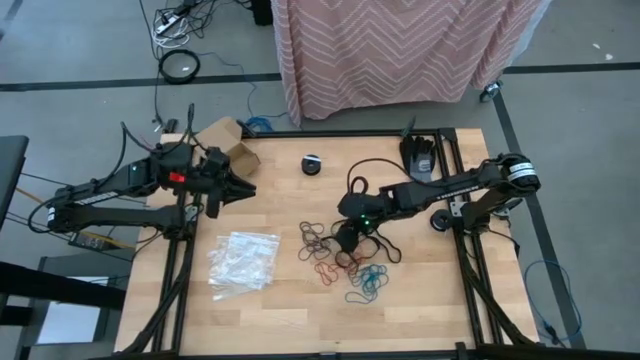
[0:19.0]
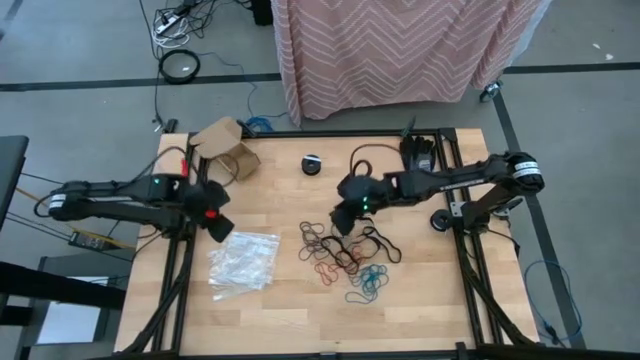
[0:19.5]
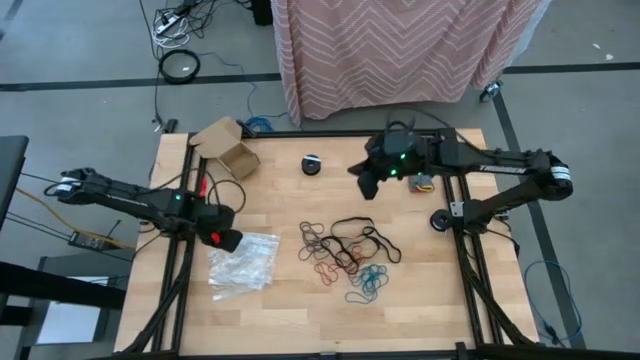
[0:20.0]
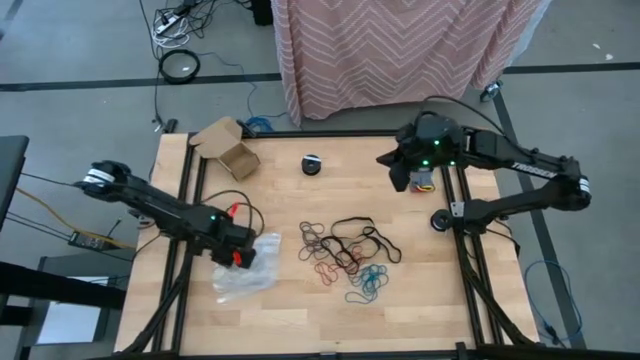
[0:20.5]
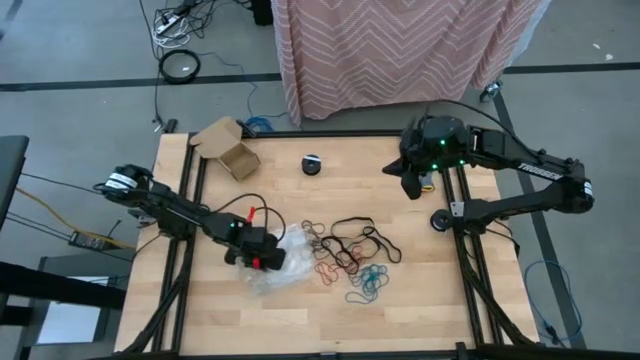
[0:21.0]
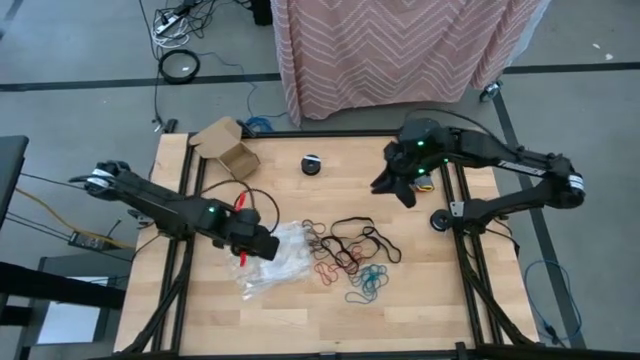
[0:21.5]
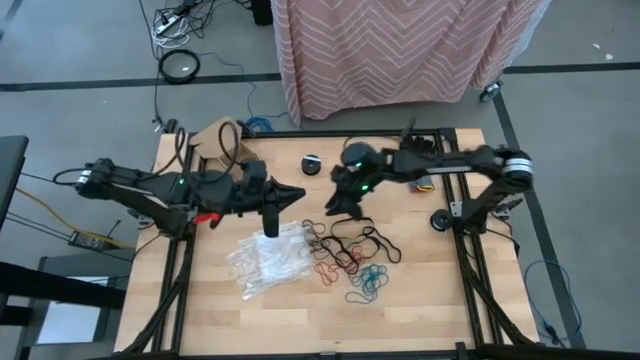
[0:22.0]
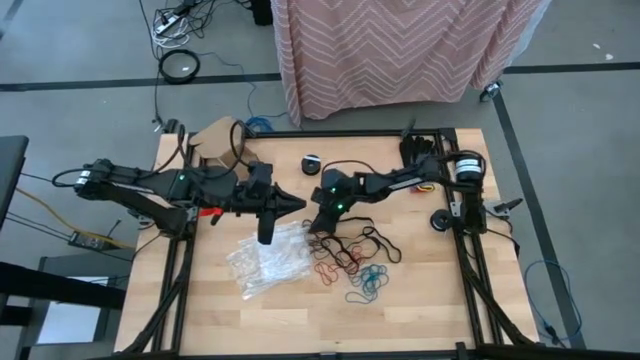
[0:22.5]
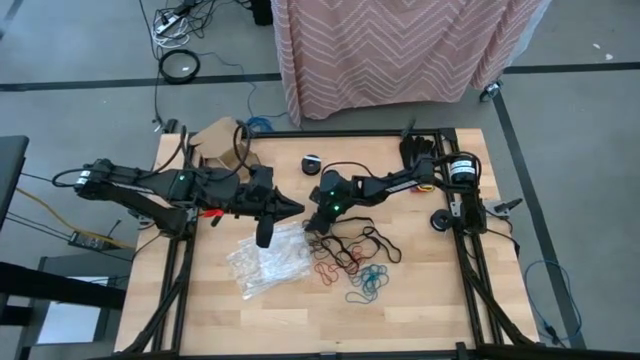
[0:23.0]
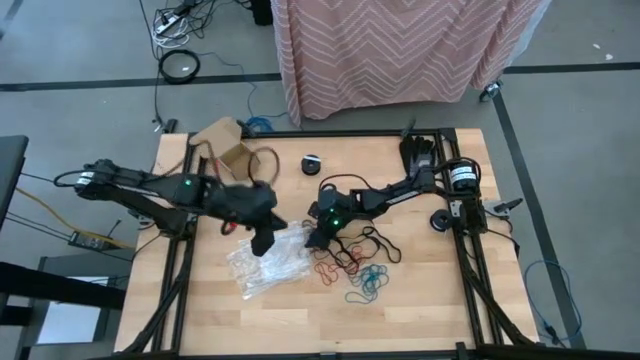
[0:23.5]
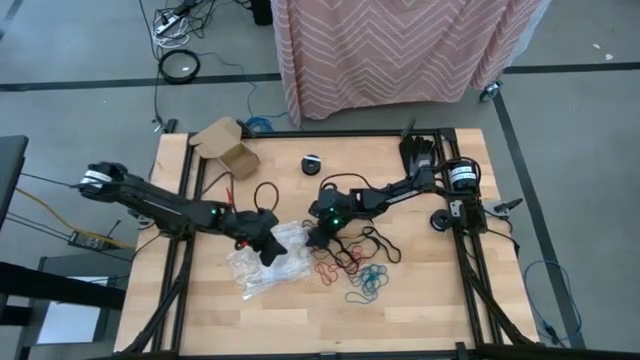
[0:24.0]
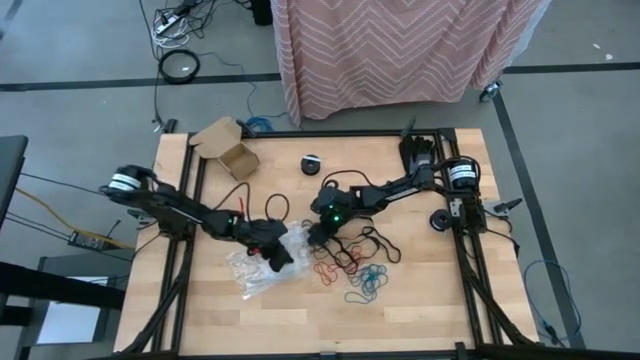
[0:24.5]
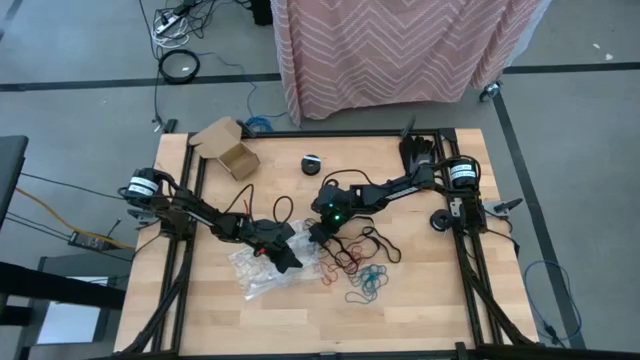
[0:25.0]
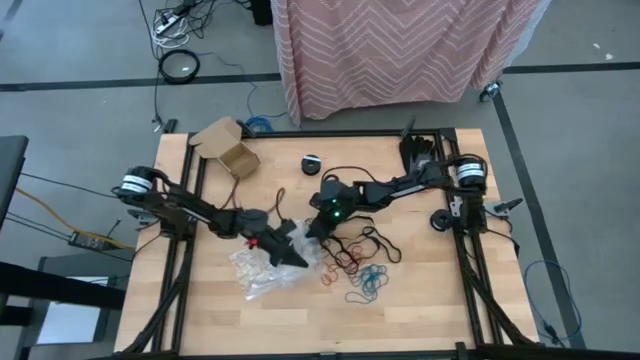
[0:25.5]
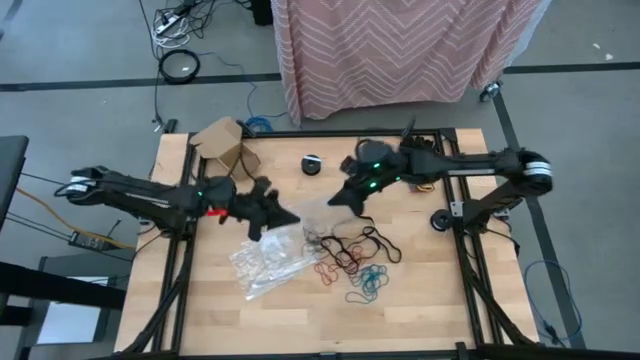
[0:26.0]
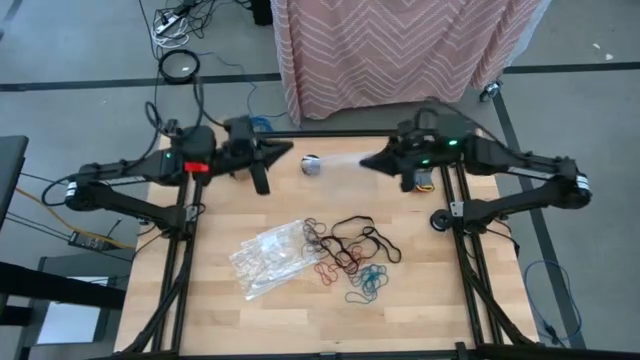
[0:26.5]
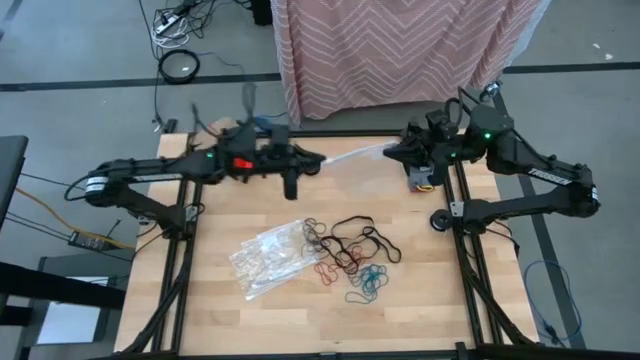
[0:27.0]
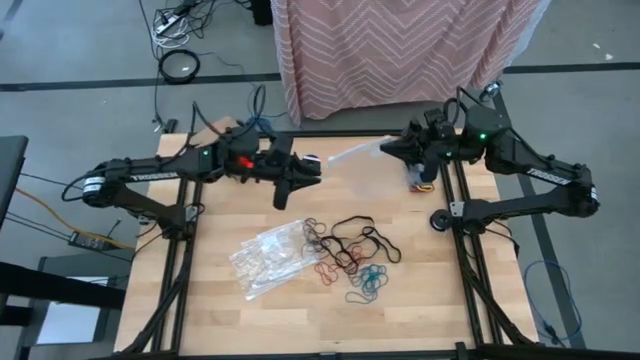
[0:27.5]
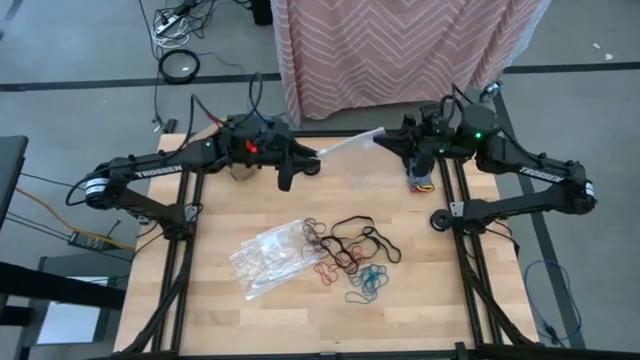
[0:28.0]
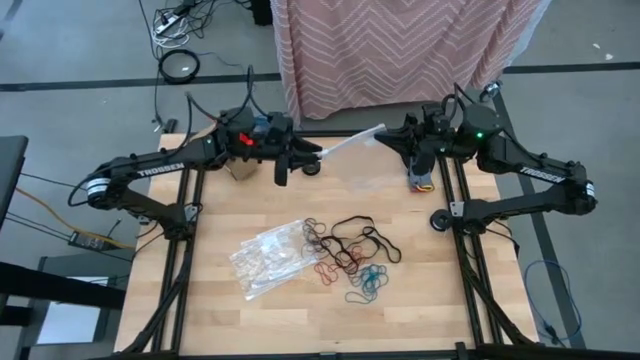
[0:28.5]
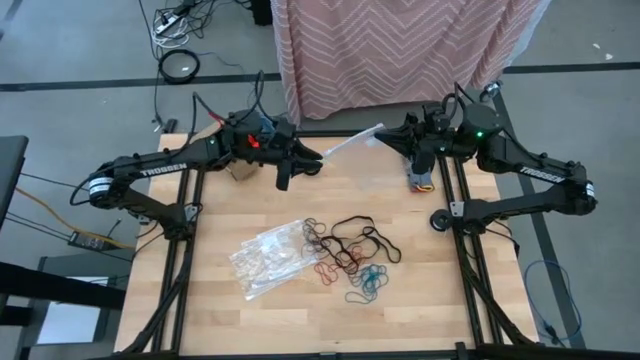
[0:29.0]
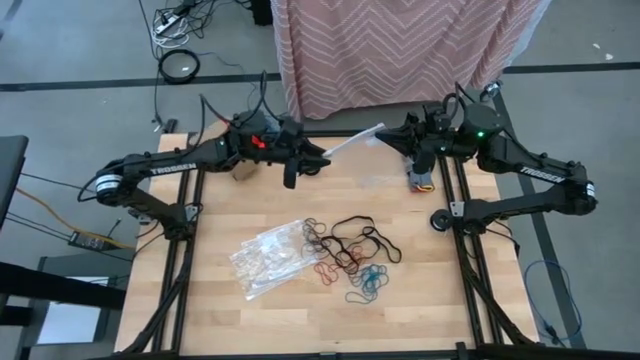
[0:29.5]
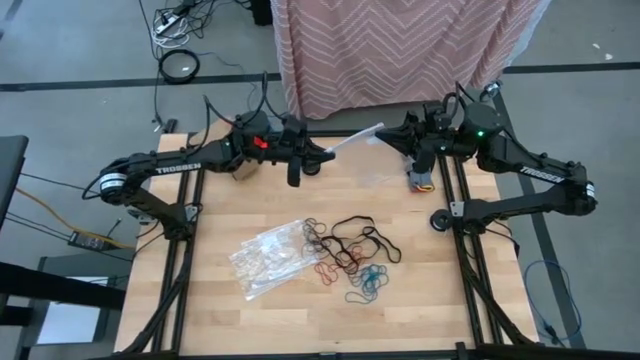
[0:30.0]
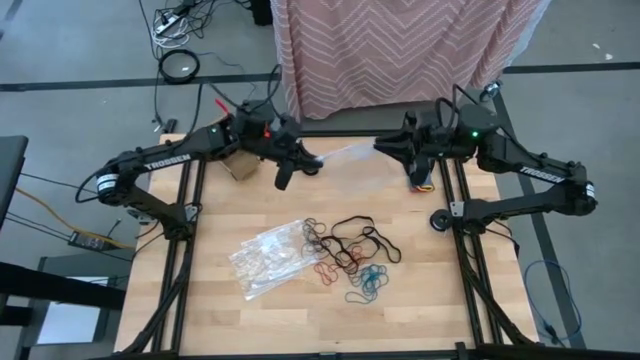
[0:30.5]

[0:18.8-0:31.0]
Task: Sort rubber bands
Open the transparent zip bag

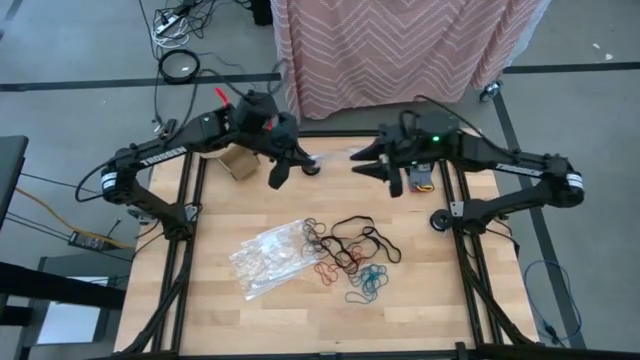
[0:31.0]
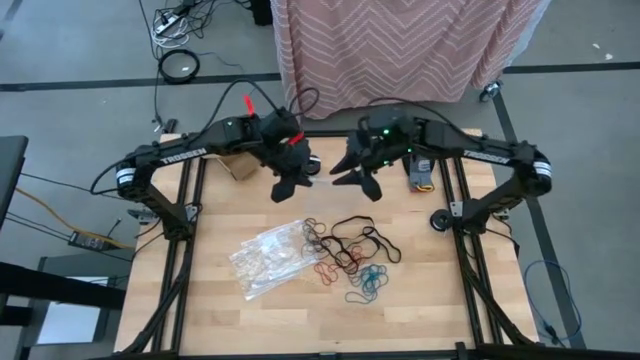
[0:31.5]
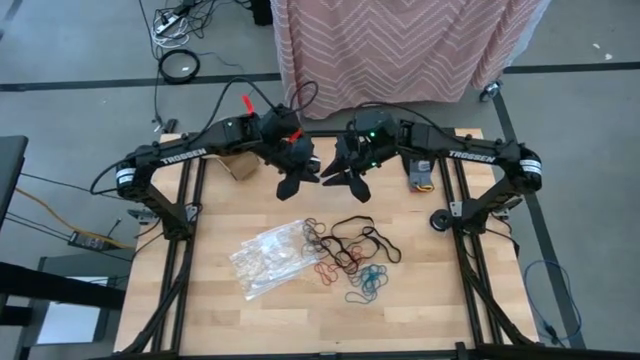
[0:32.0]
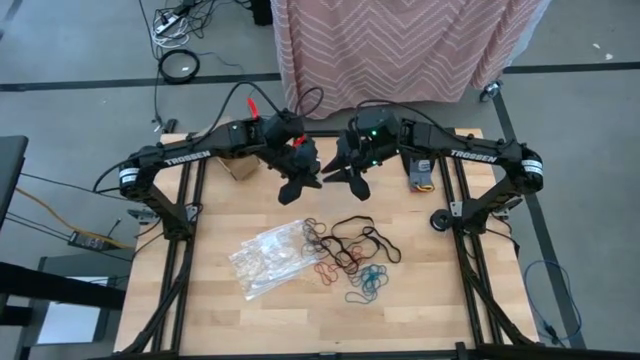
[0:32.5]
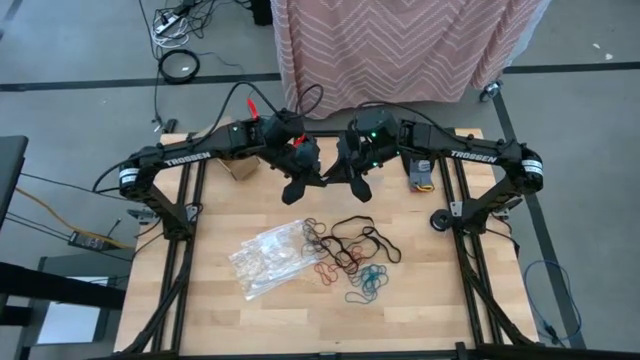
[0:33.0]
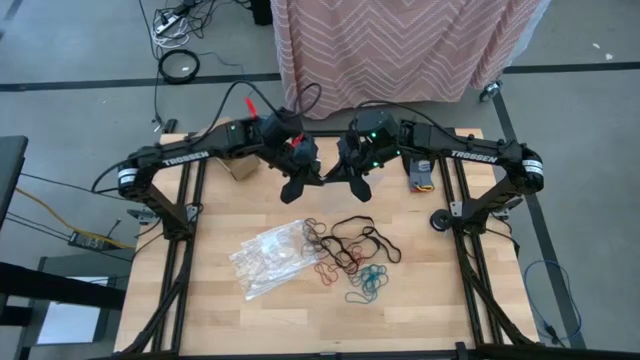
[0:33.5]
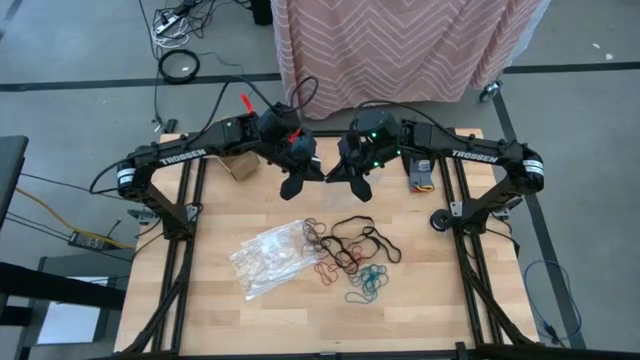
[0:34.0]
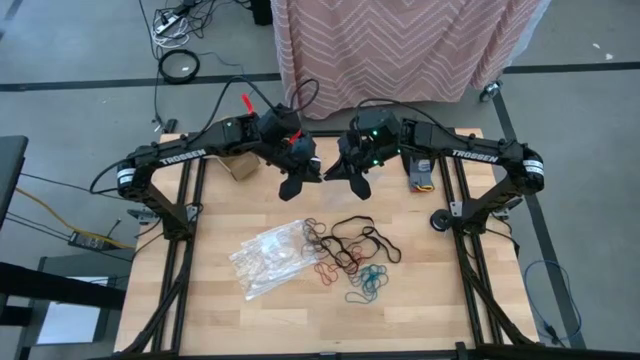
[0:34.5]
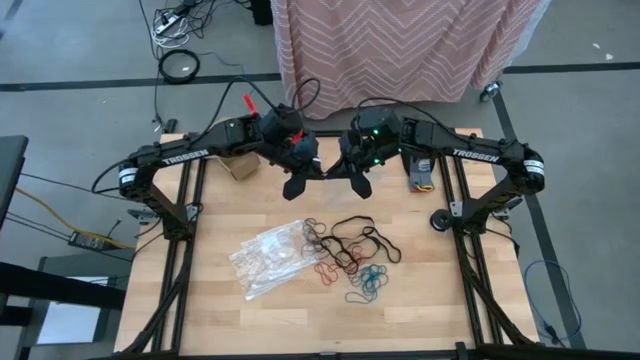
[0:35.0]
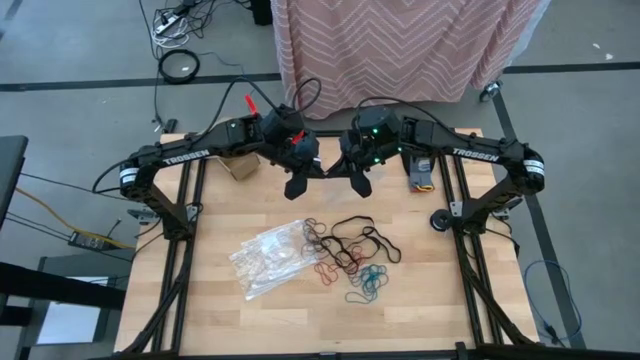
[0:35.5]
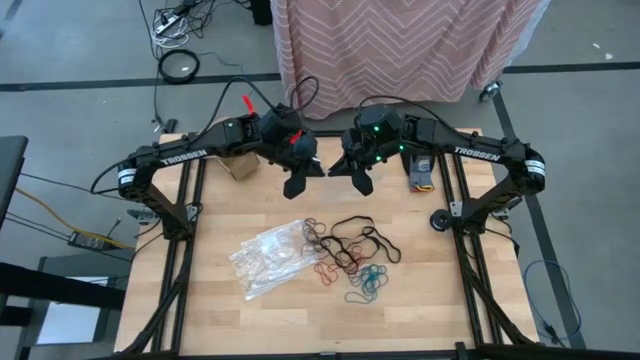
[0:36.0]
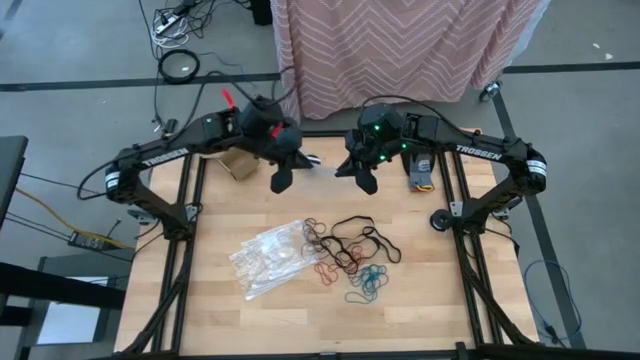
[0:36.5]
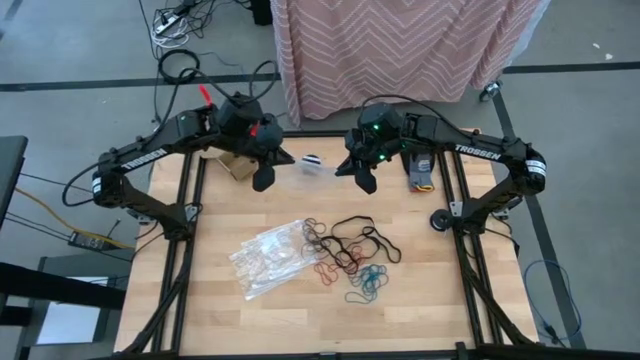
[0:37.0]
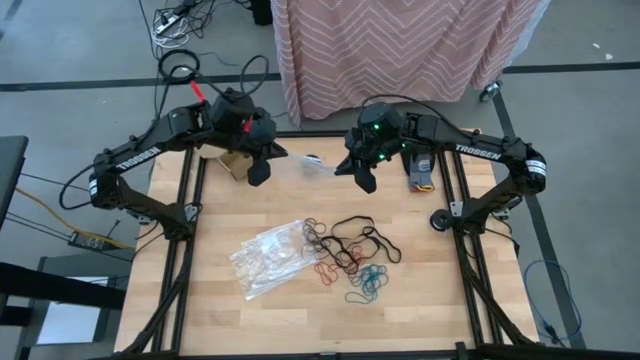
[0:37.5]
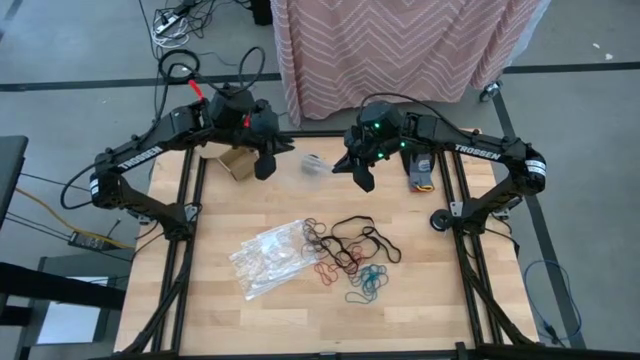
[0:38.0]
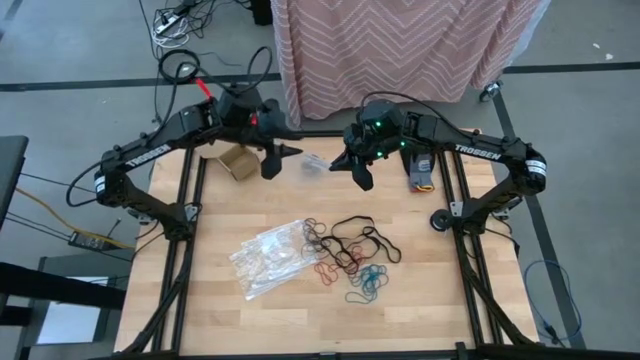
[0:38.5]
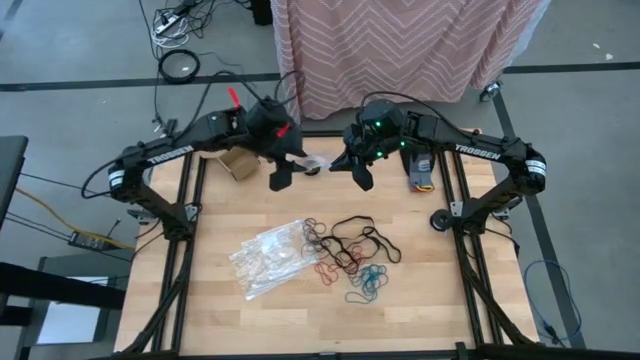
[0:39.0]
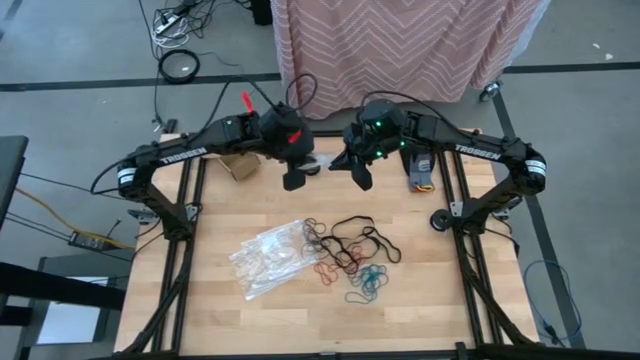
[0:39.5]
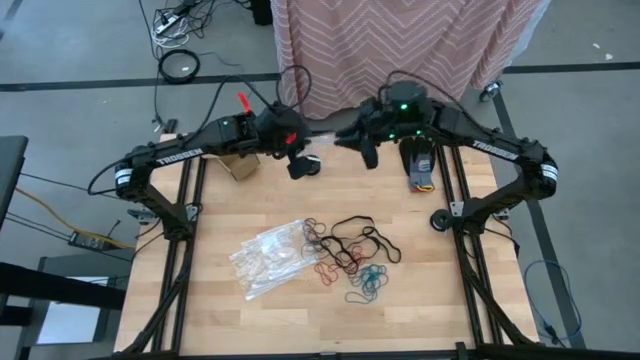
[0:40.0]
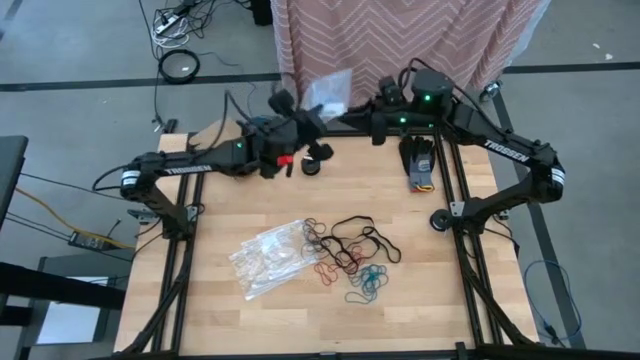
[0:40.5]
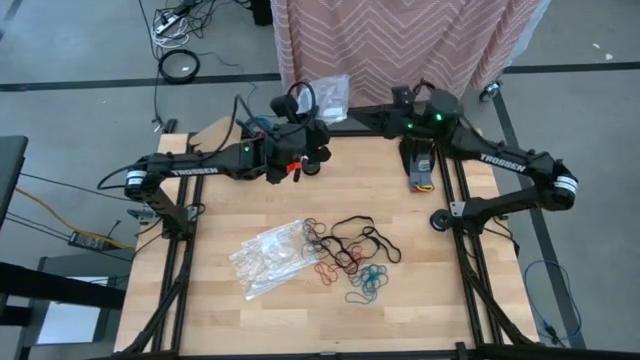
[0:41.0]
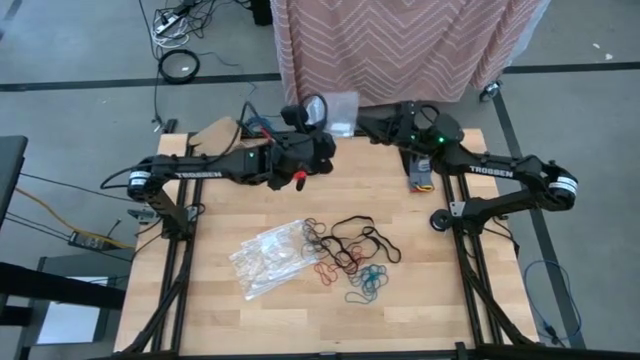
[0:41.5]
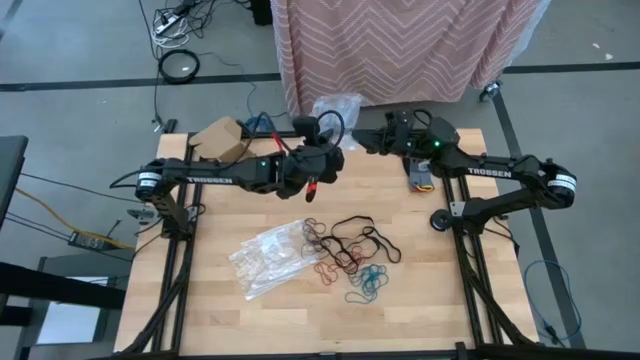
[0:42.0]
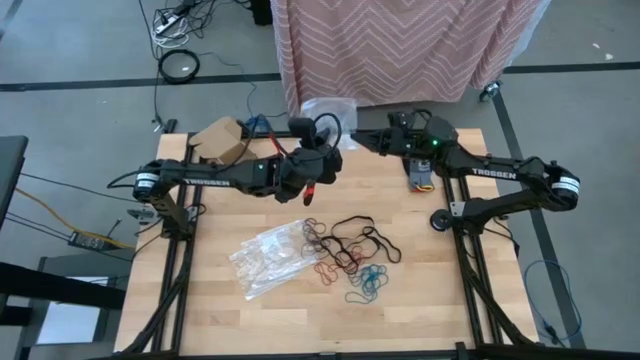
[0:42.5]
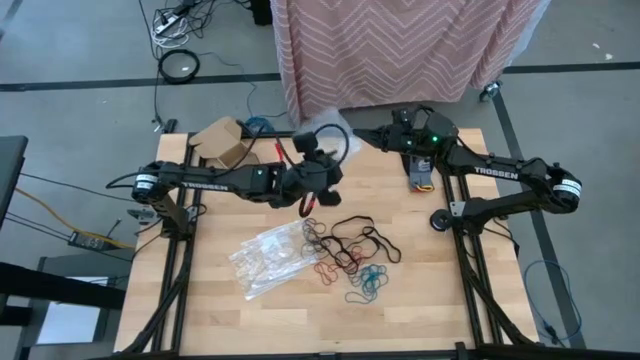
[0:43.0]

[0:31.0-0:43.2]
Open the transparent zip bag
